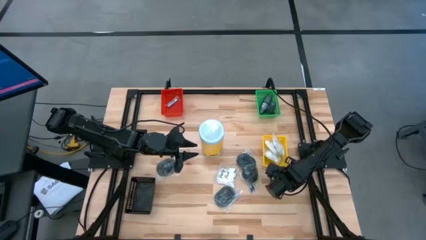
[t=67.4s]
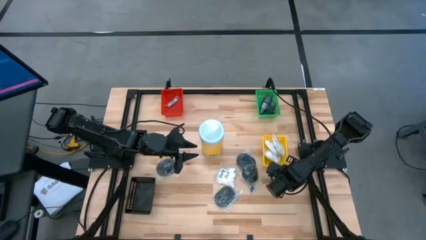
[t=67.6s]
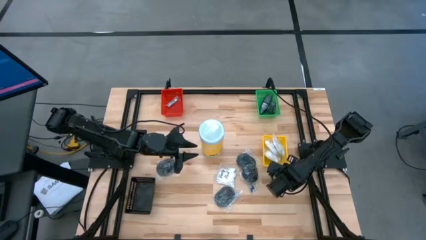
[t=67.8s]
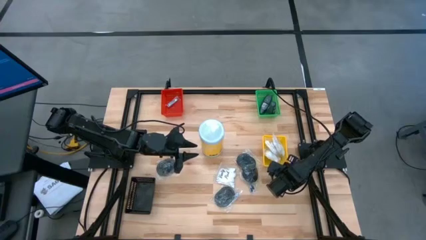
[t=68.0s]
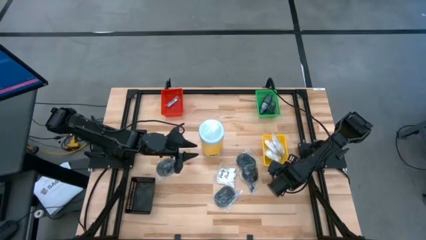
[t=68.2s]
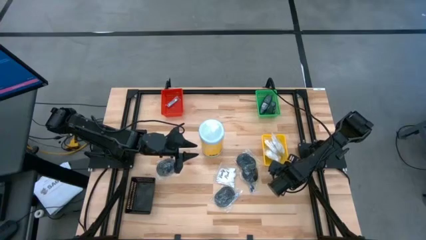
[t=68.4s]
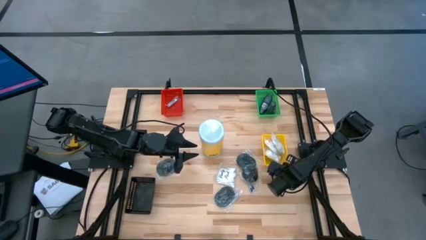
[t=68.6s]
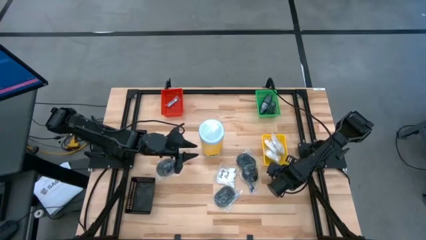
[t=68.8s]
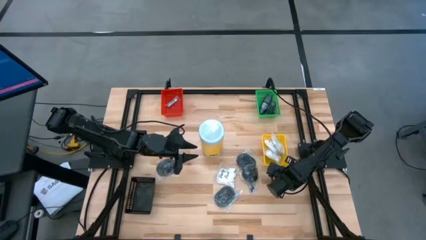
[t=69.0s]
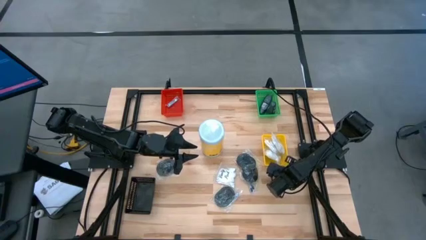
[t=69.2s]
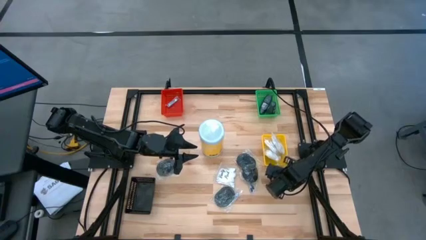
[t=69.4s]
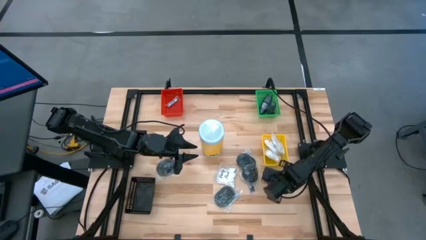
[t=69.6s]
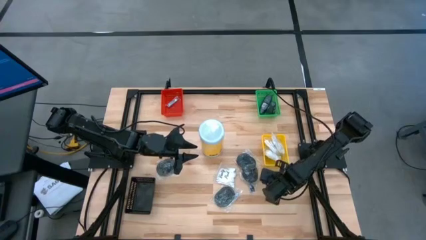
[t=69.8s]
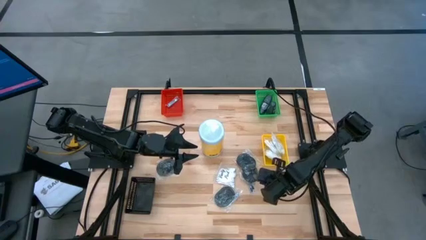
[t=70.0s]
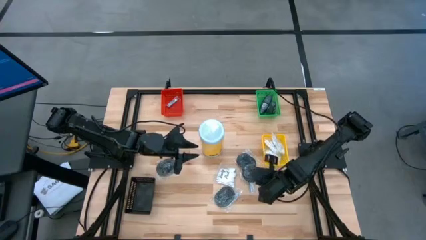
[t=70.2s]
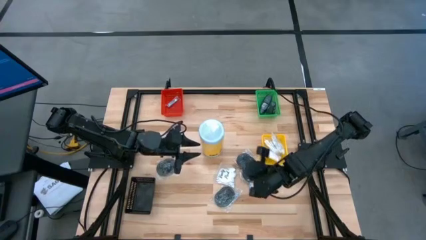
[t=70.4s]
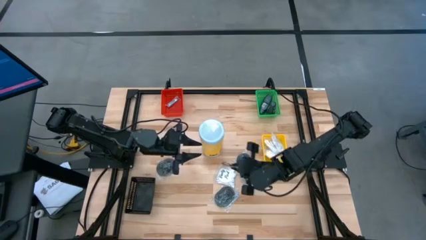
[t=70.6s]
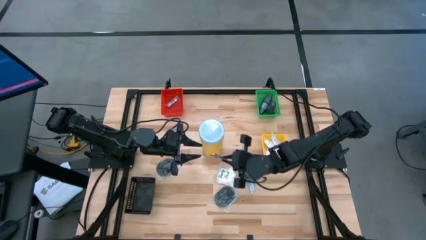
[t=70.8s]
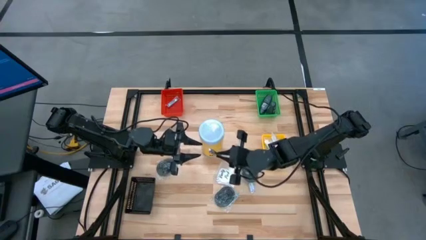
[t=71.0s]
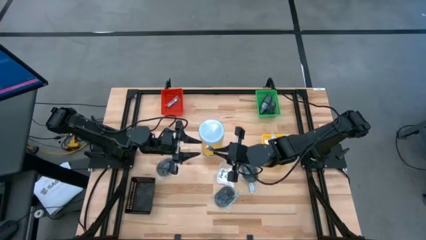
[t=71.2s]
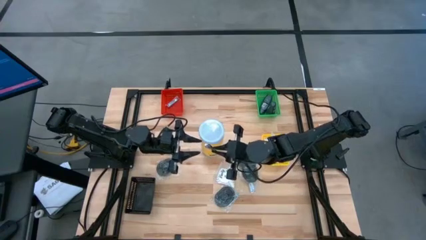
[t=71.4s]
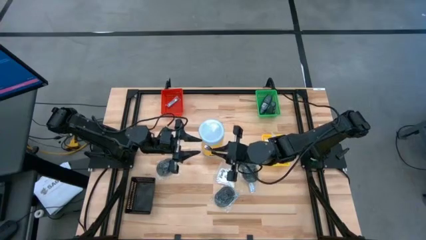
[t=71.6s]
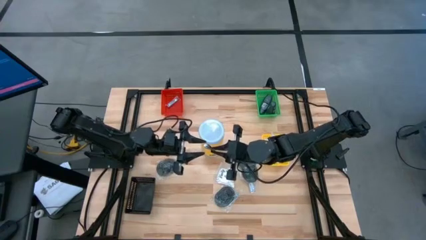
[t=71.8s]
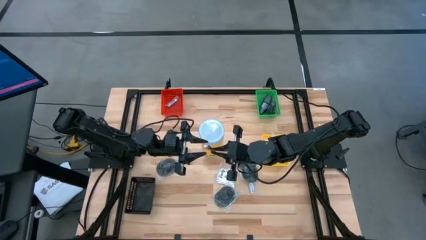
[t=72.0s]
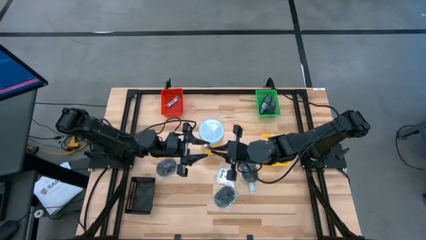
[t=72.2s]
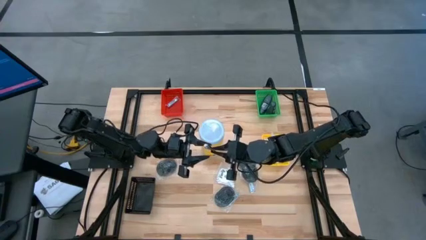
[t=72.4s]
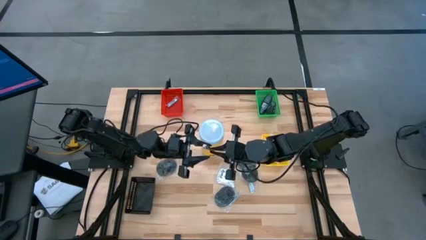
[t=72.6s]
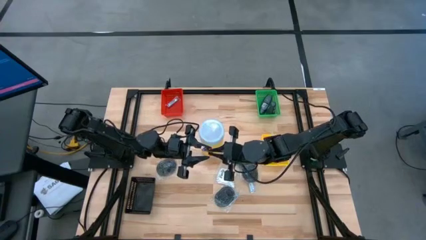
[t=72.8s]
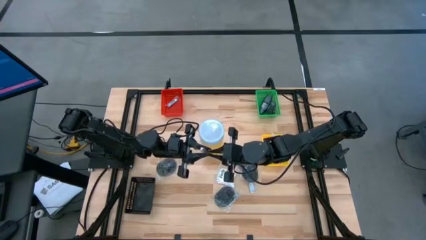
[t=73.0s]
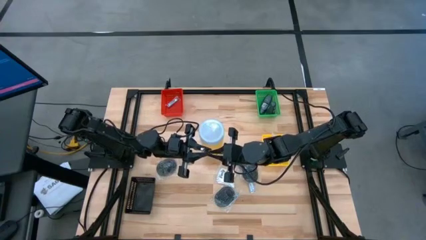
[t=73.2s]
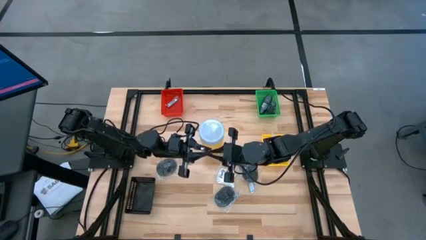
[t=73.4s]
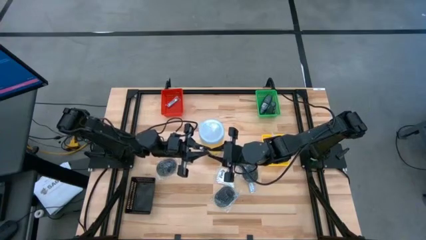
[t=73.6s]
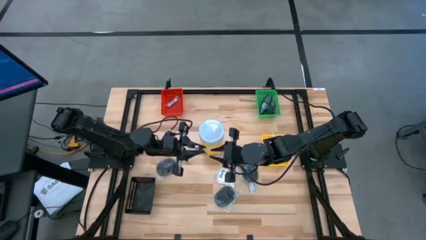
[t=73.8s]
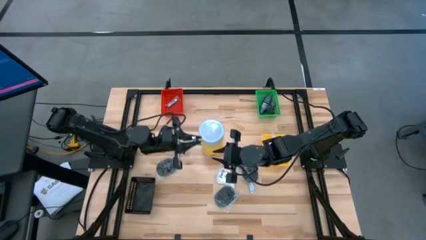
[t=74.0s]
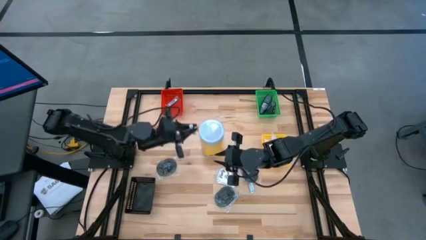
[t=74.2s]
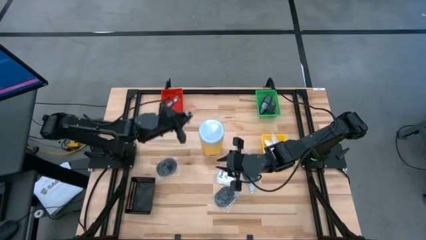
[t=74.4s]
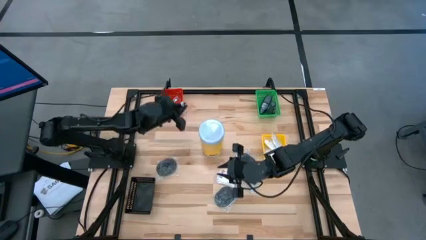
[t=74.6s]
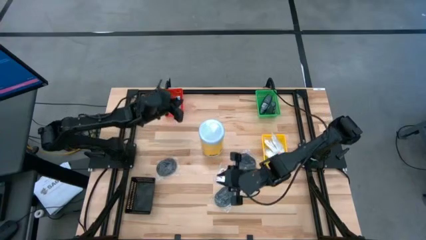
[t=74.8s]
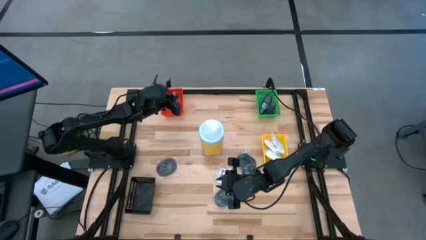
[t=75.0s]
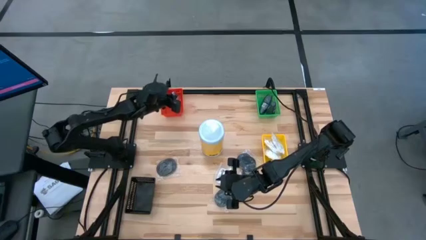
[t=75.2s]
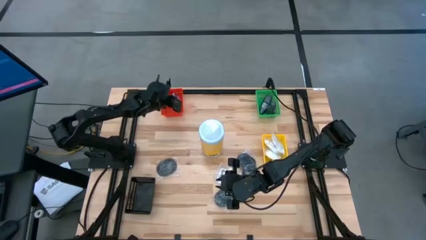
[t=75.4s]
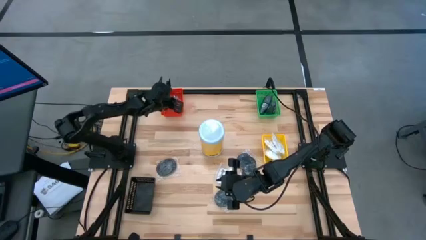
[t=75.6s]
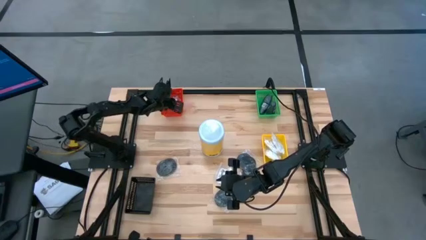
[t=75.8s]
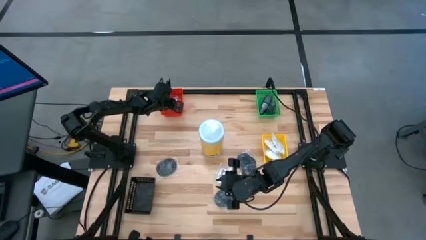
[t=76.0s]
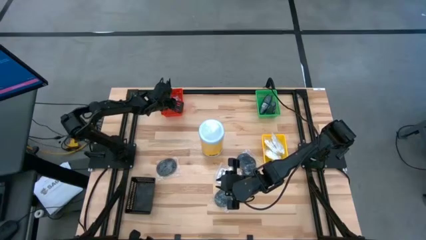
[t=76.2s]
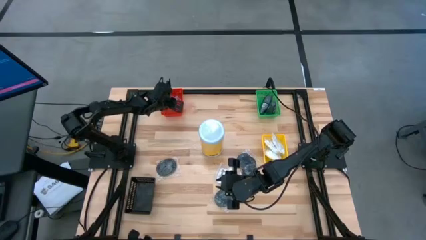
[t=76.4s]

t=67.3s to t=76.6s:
Task: Pick & Place Travel size toiletries
Put the silver nail cutter into the red bin

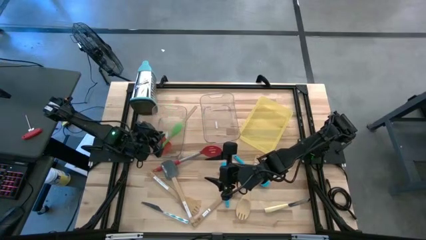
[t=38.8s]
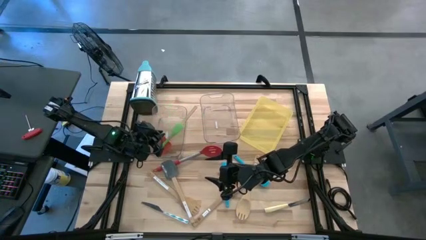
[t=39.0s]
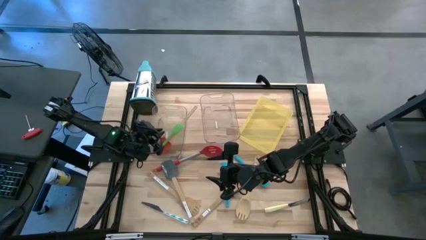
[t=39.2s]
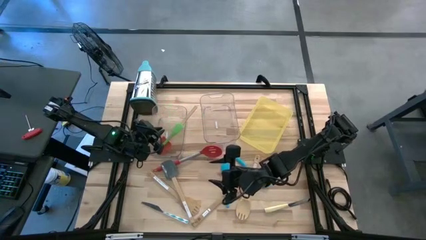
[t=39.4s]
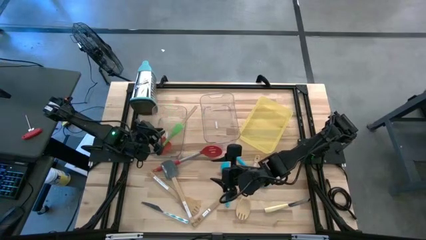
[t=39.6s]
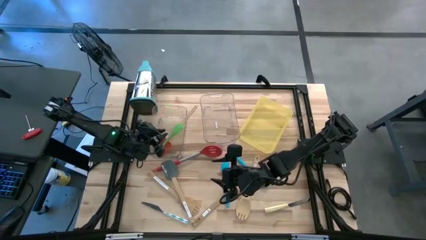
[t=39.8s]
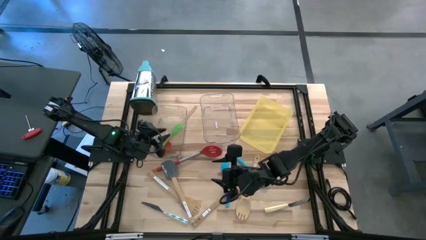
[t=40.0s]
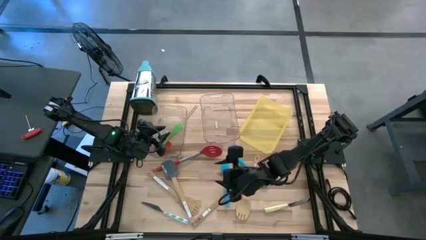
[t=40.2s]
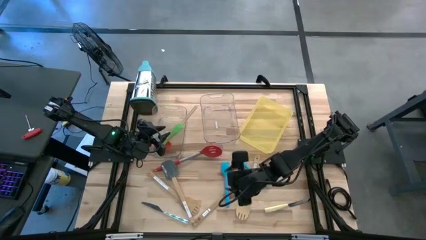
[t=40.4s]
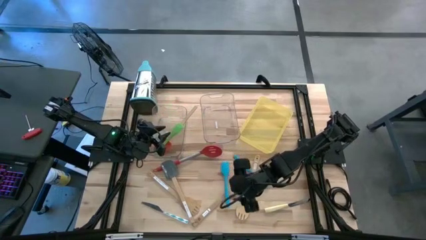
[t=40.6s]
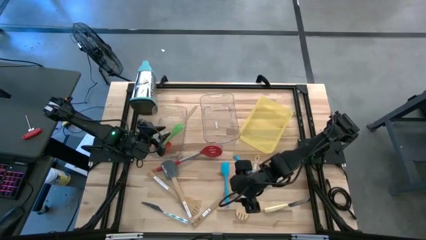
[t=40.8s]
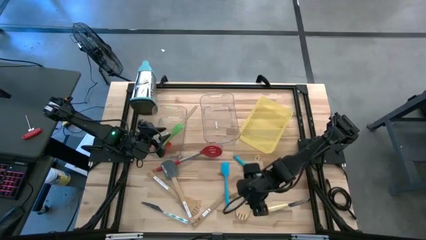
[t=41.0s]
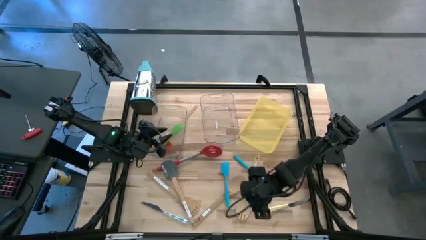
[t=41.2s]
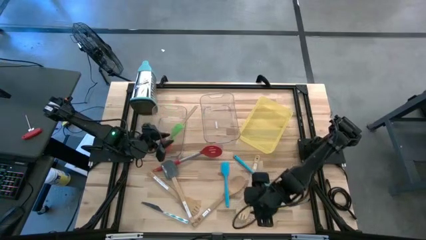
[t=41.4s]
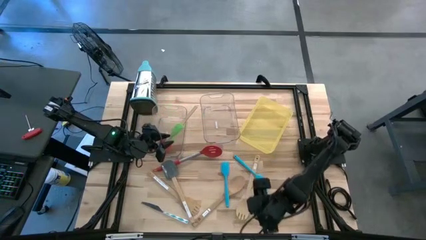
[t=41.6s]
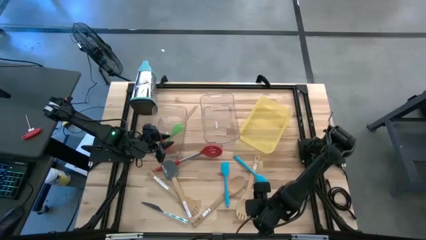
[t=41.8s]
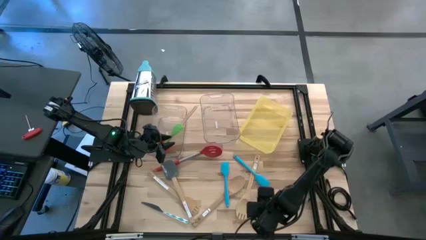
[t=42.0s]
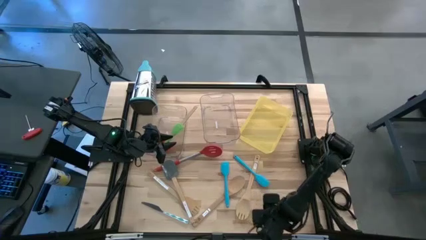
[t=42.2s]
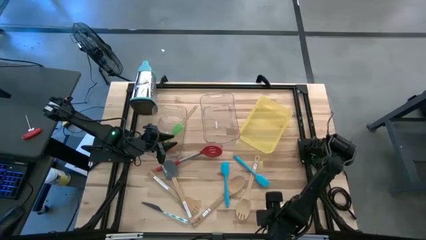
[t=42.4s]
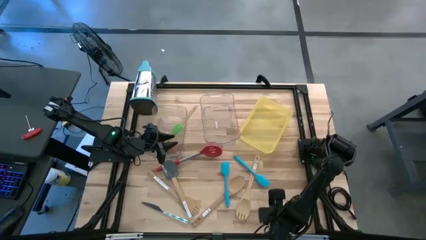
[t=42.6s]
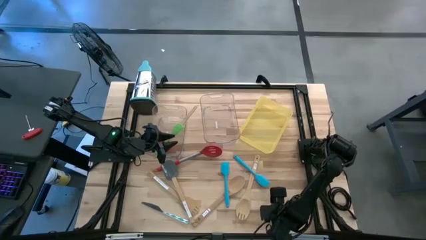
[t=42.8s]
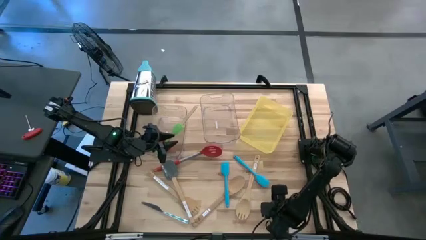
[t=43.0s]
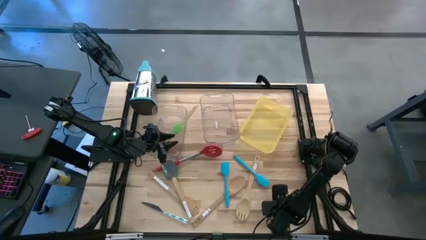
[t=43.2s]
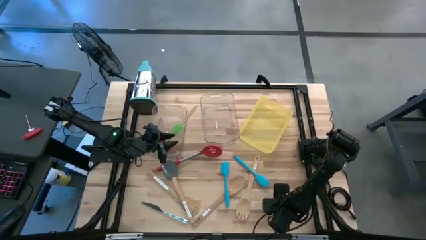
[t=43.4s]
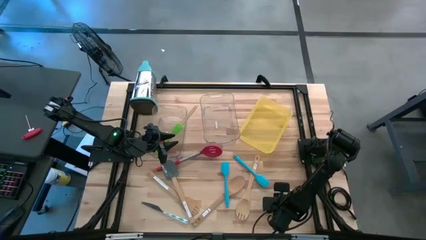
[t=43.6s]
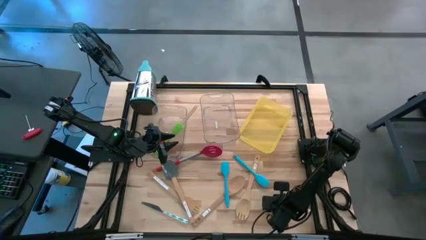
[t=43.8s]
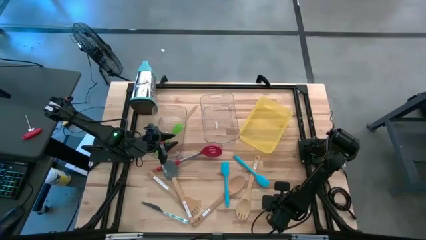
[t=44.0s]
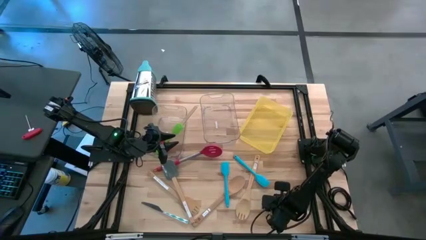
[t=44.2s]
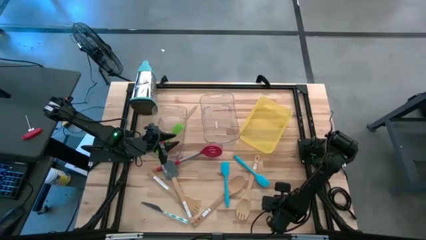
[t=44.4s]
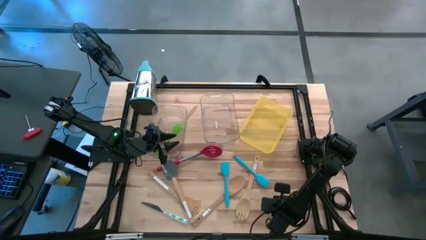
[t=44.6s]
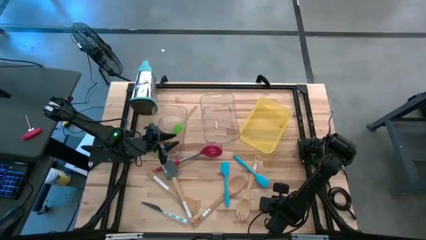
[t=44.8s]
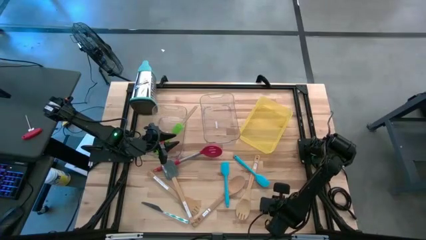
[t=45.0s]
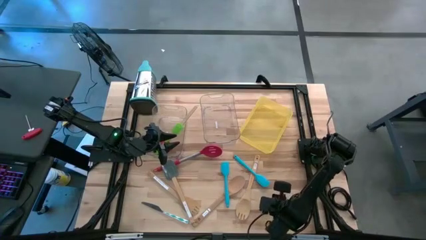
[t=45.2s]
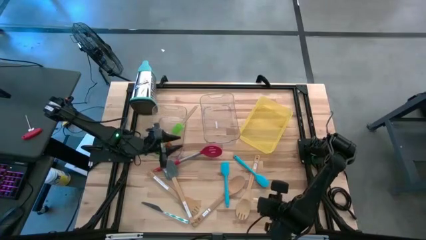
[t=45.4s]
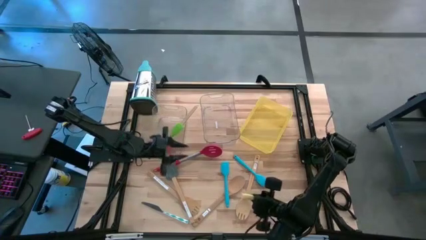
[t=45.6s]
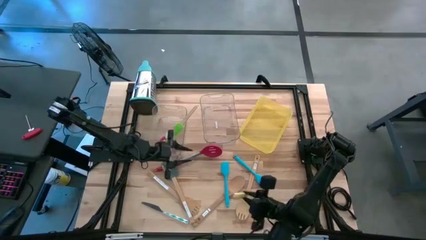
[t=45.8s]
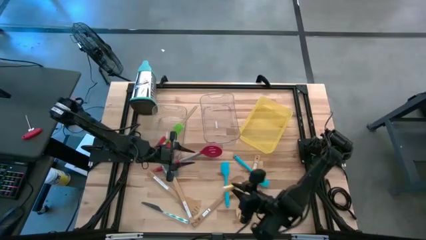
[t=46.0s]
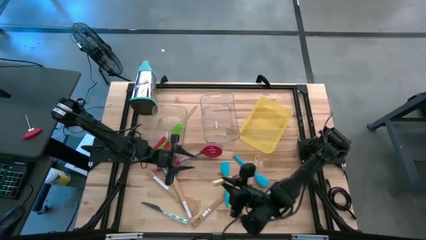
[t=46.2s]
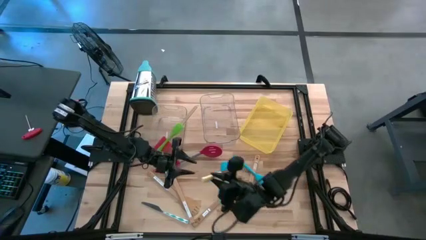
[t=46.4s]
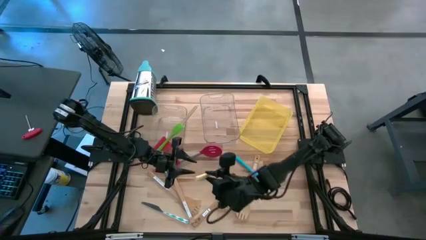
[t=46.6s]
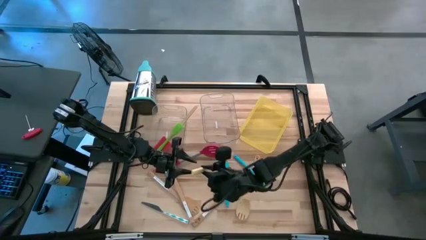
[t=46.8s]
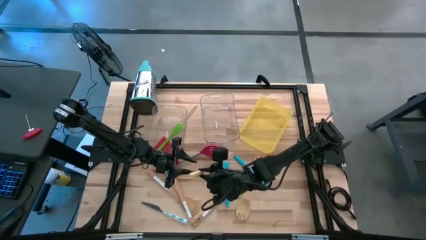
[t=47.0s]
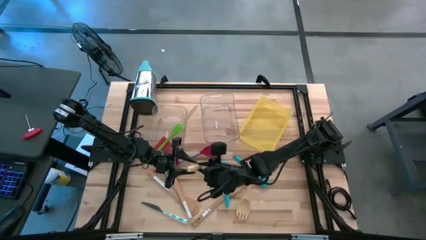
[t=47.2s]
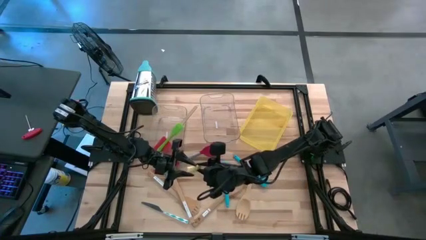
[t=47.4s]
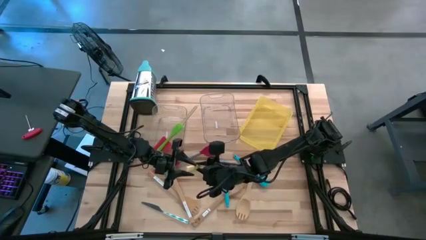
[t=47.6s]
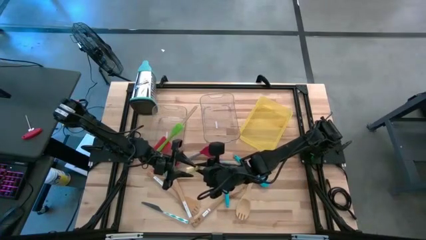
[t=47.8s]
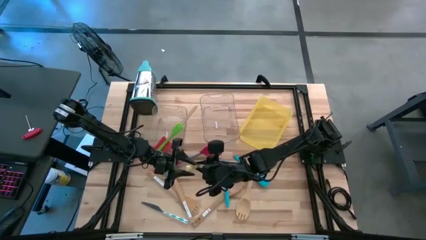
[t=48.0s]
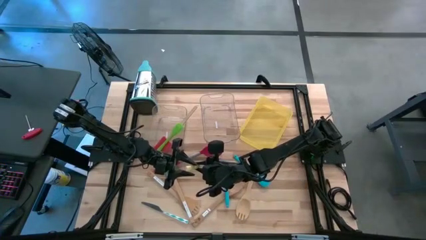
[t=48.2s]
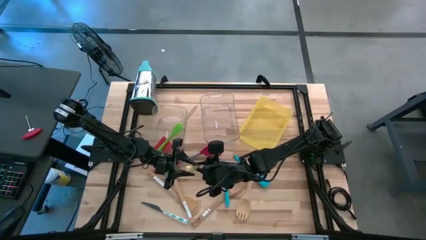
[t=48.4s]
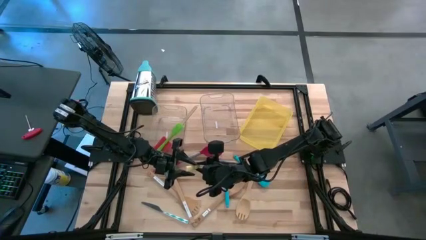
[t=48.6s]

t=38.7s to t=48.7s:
Task: Pick & Place Kitchen Items
Put the yellow knife into the right transparent bin
